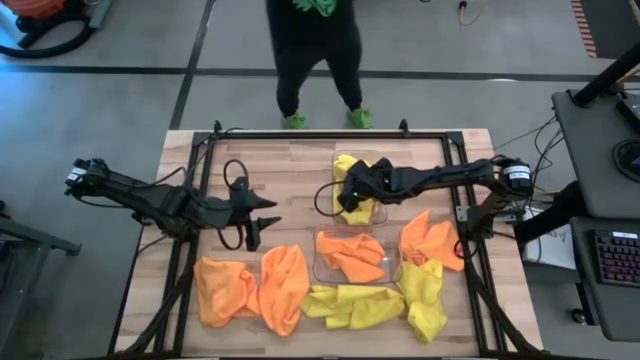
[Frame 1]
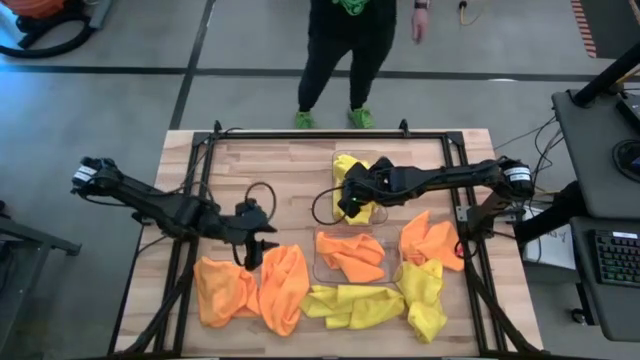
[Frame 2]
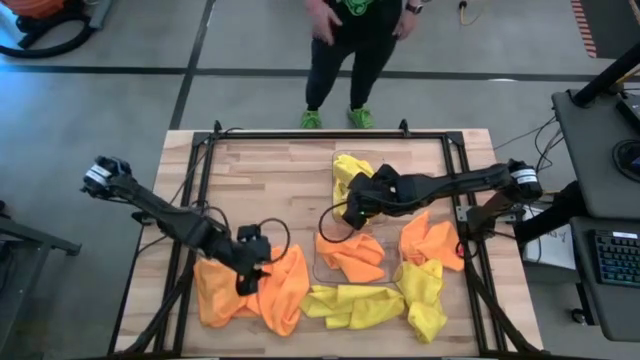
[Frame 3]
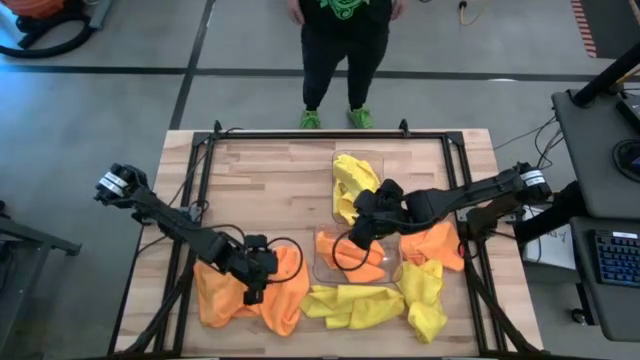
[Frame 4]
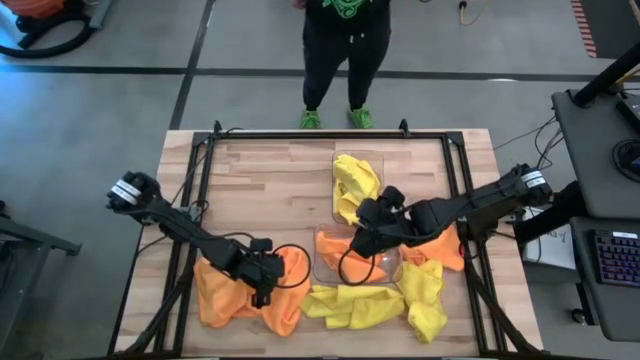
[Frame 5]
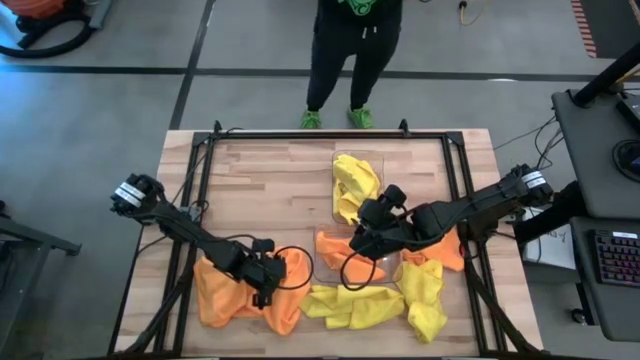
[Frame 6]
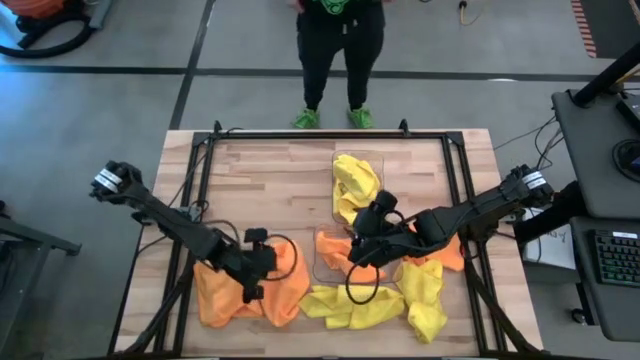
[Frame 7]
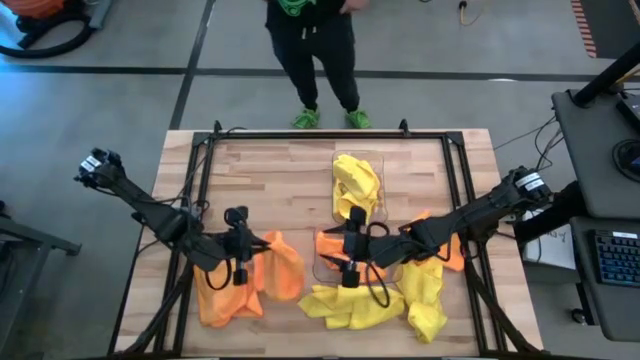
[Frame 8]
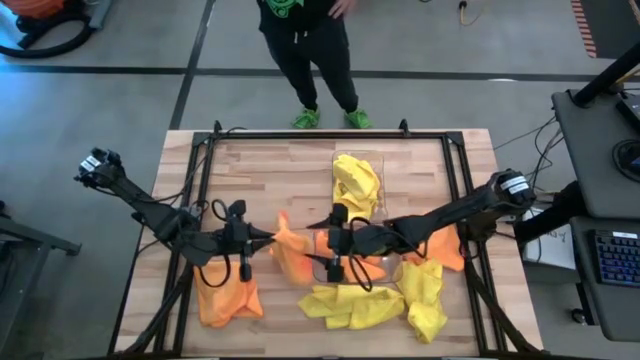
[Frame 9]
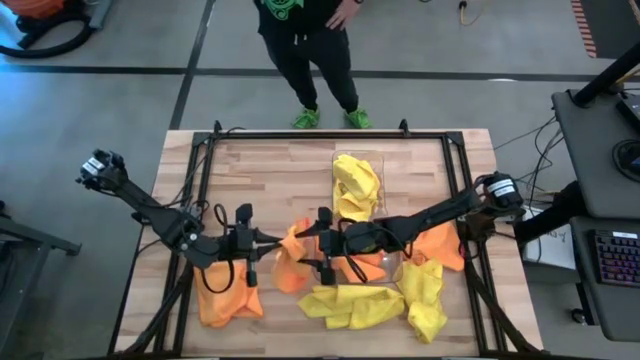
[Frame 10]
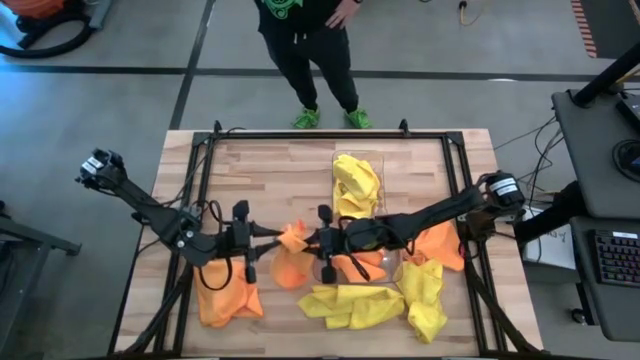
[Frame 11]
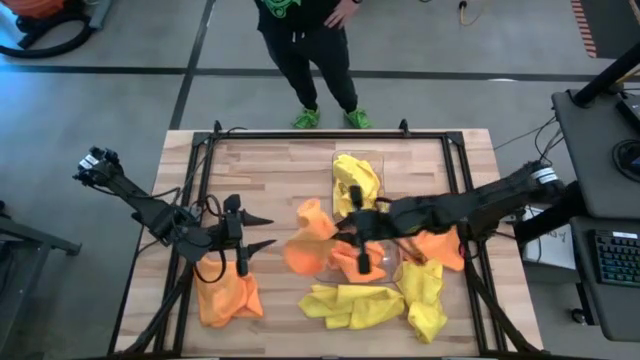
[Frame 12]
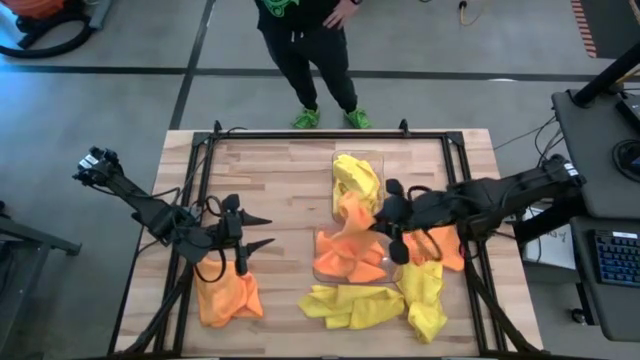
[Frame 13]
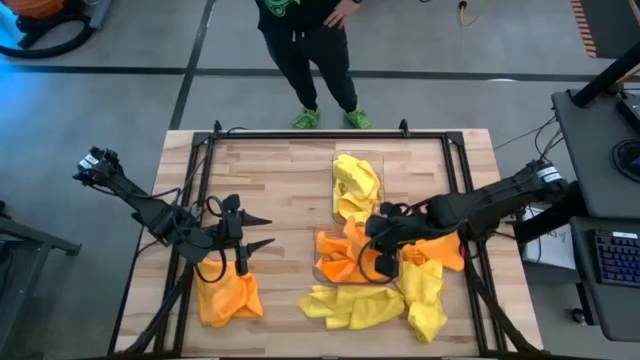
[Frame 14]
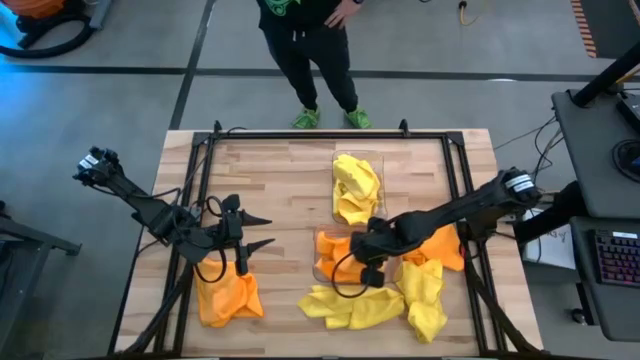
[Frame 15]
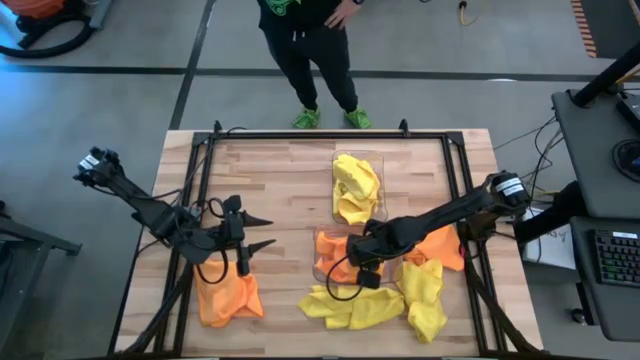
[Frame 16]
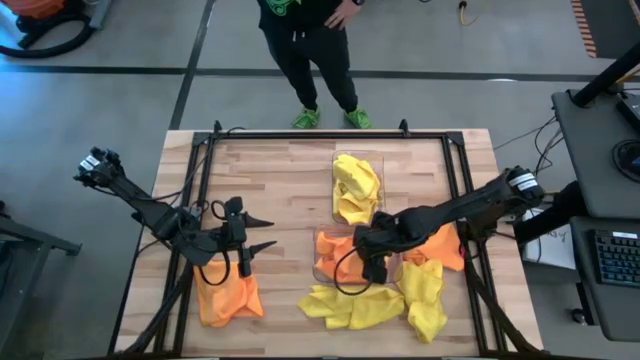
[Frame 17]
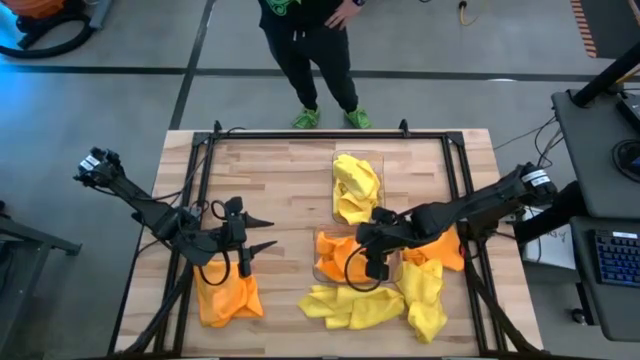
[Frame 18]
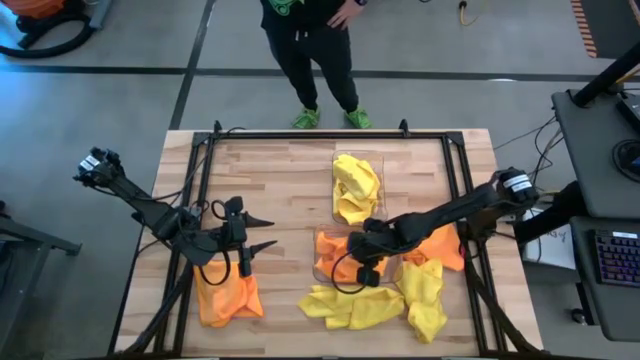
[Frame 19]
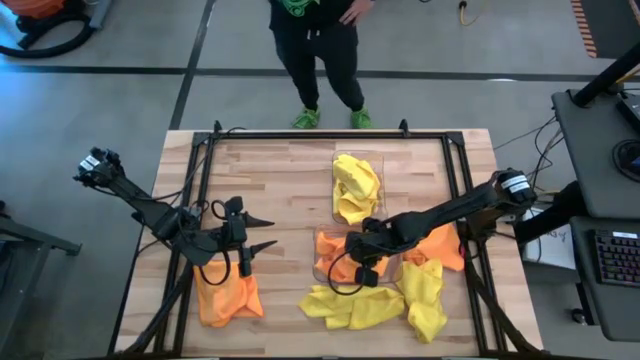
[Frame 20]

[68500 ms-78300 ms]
Task: Sort microfiber towel by color & place in baskets
Put the orange towel into the bottom transparent bin

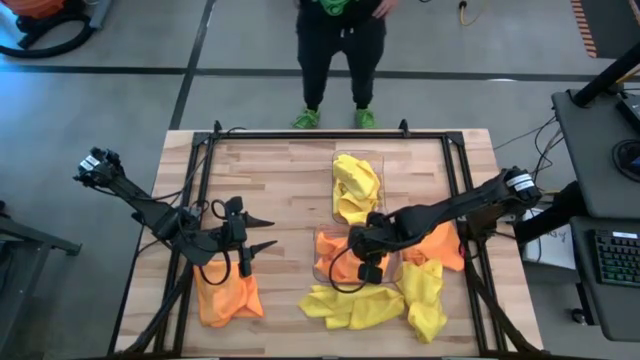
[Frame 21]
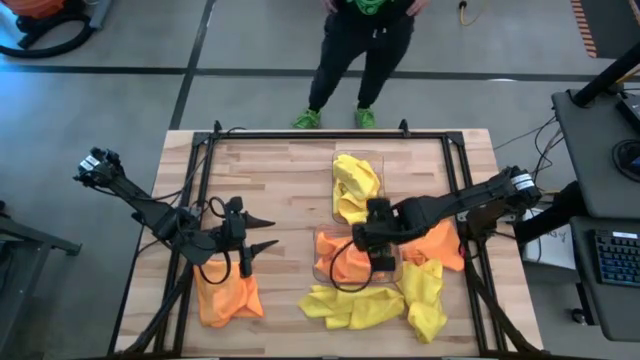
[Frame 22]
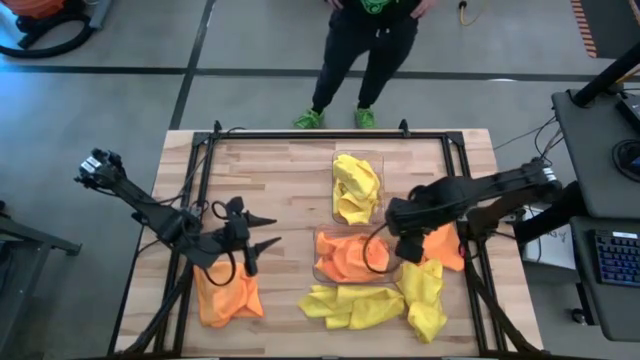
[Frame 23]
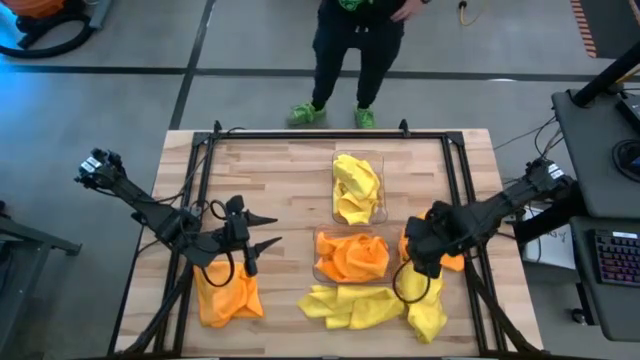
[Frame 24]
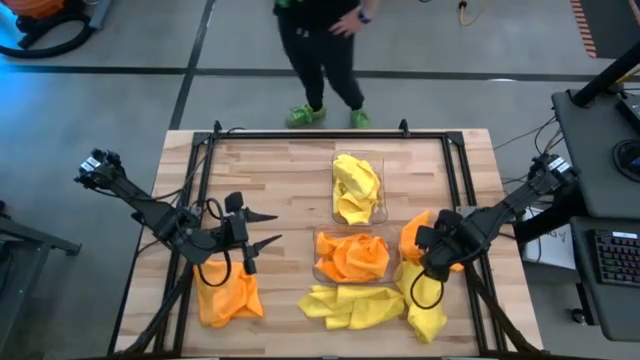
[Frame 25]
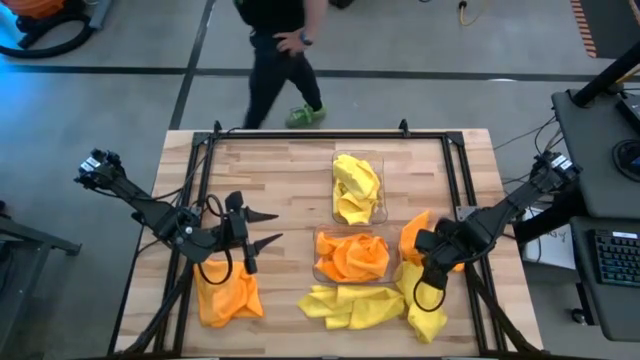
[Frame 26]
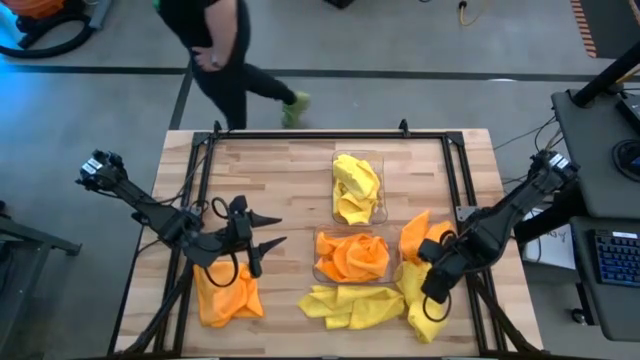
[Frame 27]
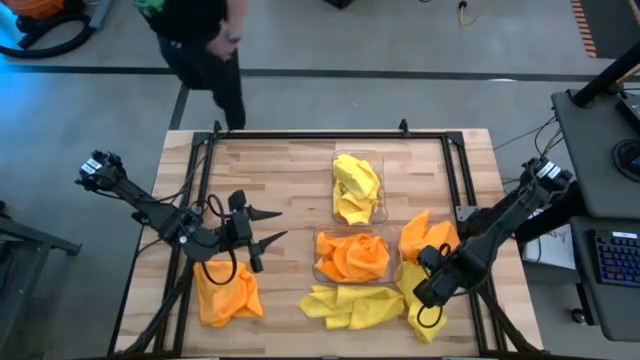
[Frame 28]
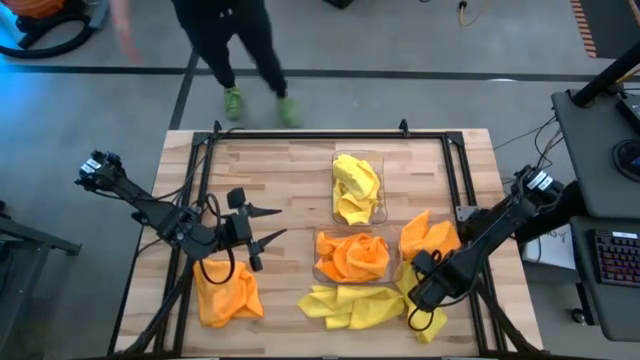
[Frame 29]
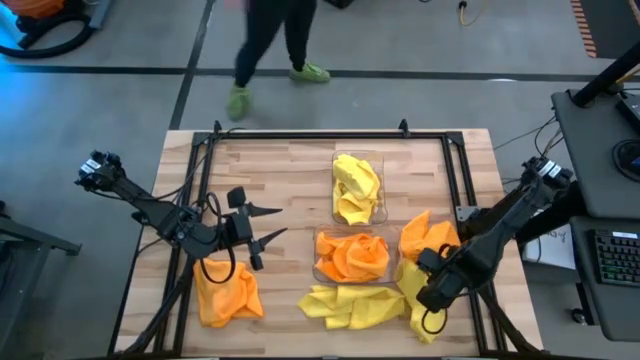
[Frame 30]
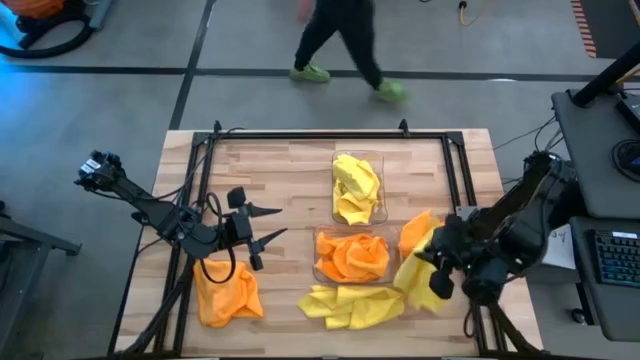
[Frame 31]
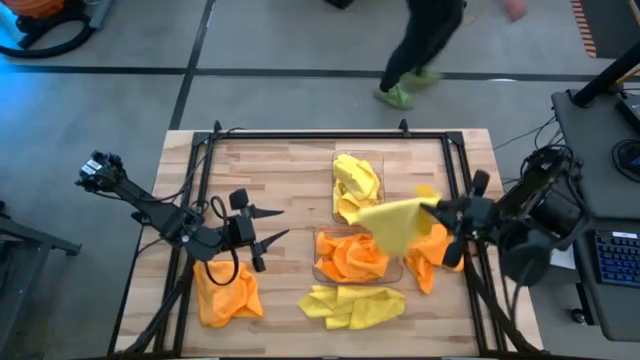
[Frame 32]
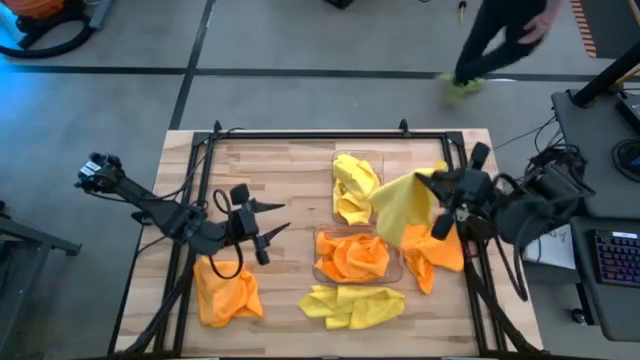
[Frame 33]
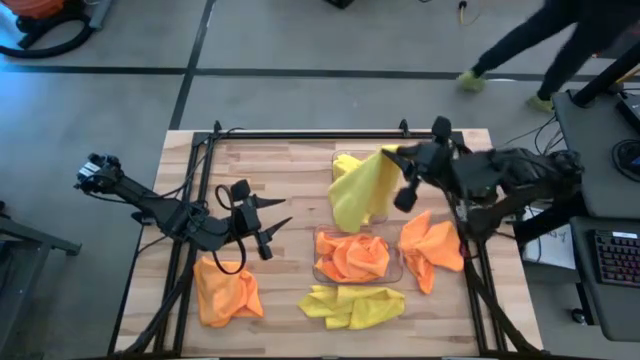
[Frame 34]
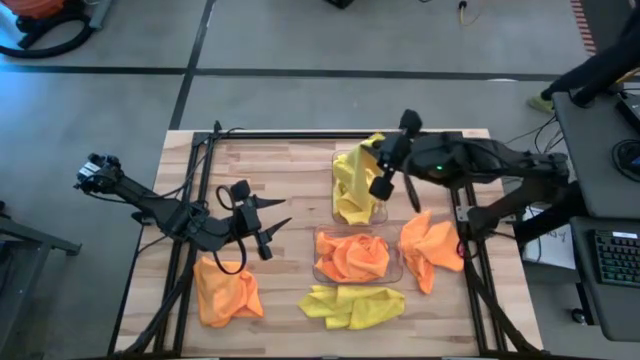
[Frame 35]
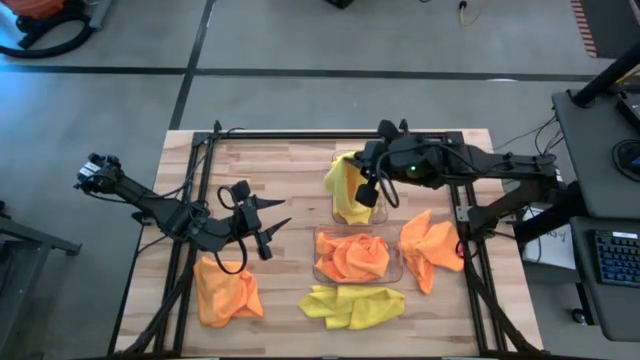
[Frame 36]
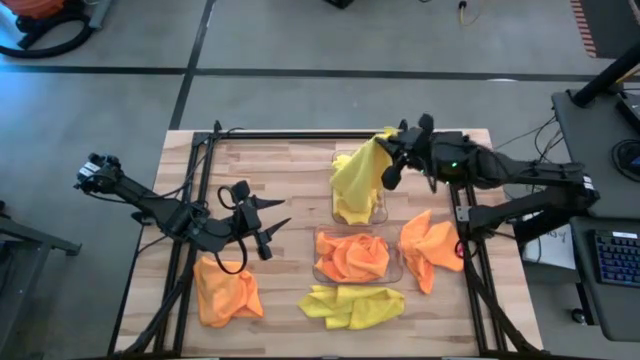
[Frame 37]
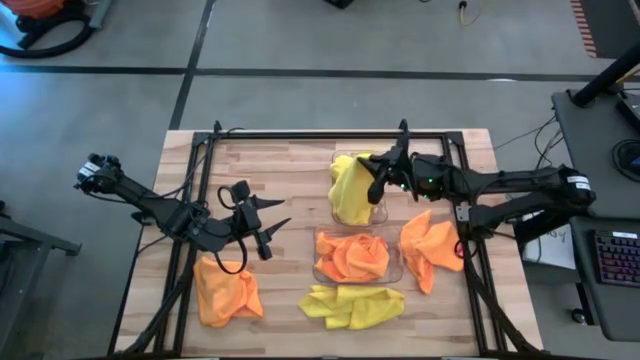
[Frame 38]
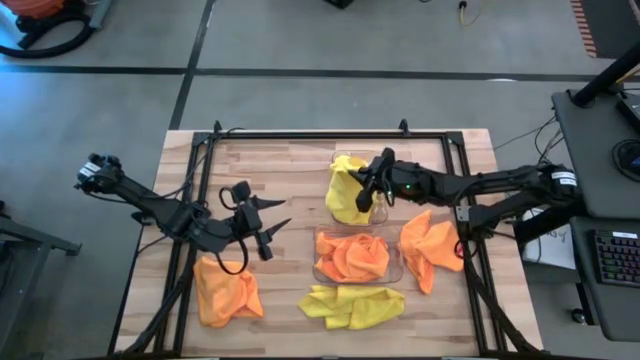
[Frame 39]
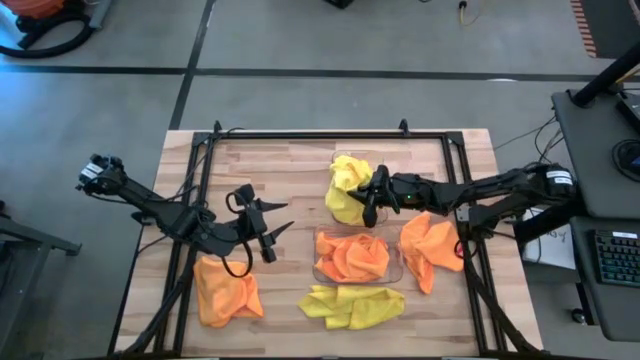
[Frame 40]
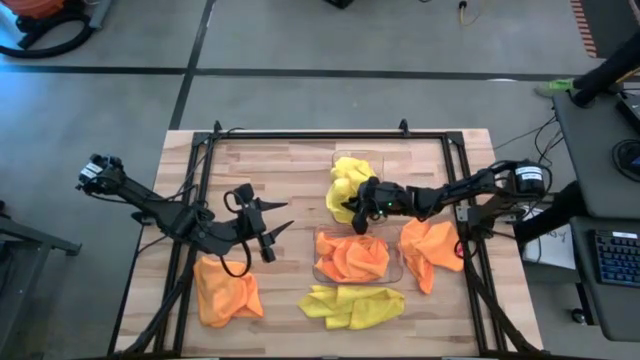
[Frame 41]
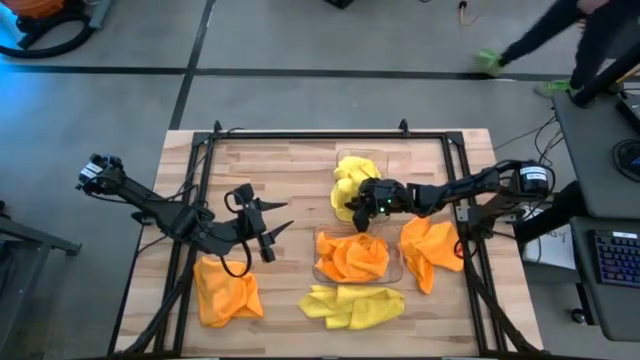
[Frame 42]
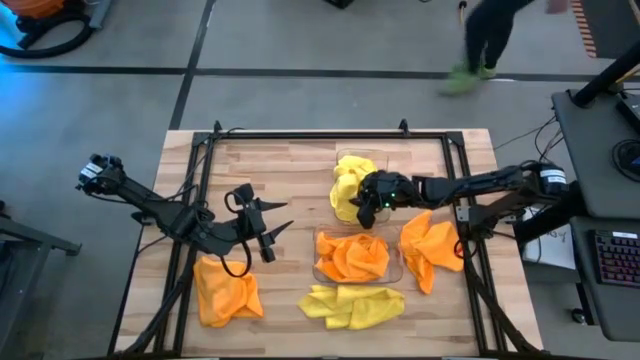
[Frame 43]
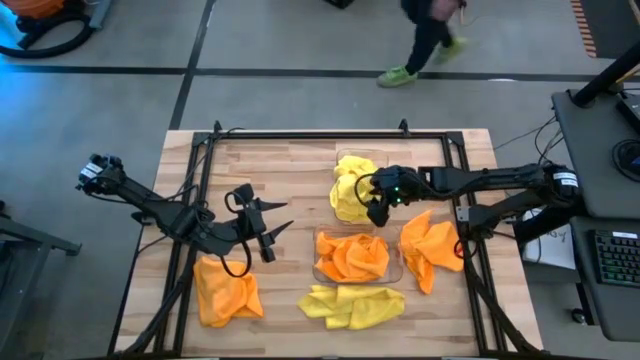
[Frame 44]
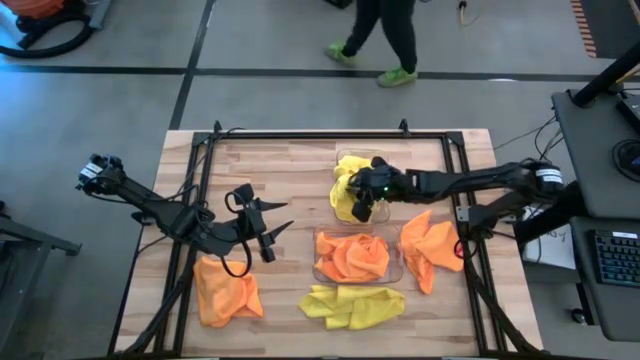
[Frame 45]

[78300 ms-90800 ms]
Put the yellow towel into the top transparent bin
